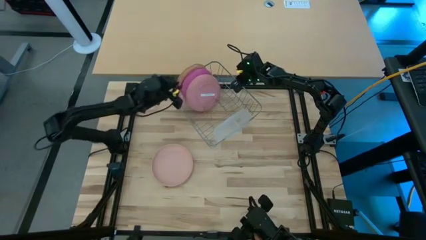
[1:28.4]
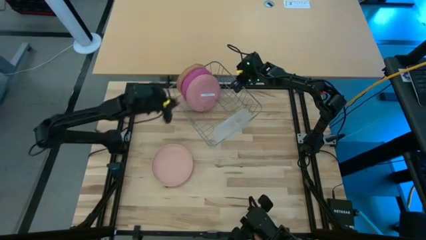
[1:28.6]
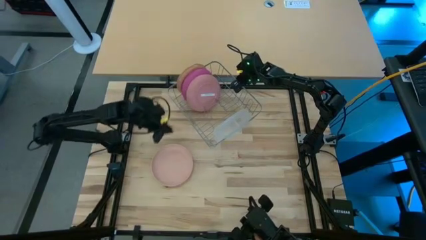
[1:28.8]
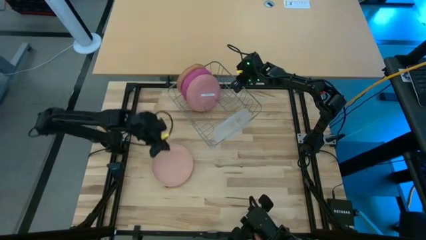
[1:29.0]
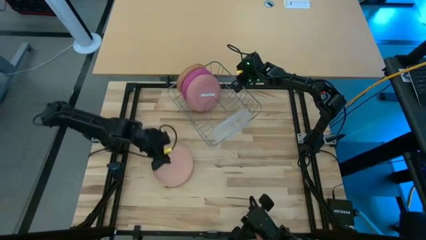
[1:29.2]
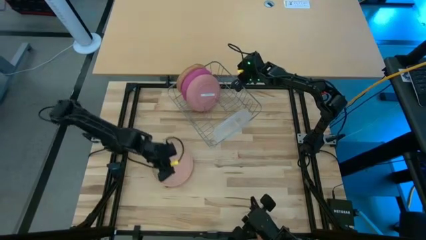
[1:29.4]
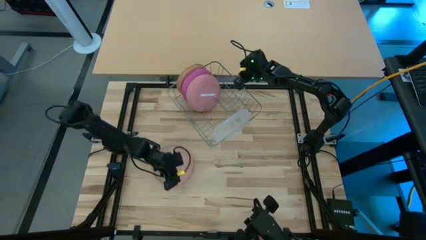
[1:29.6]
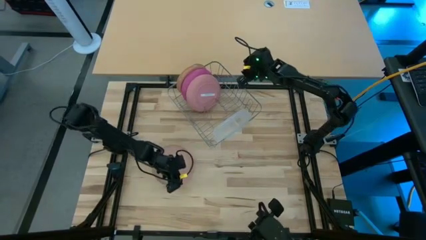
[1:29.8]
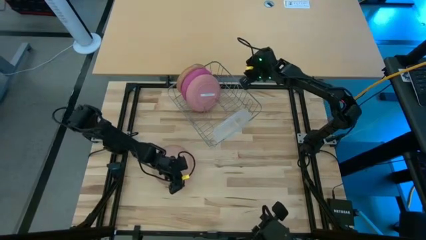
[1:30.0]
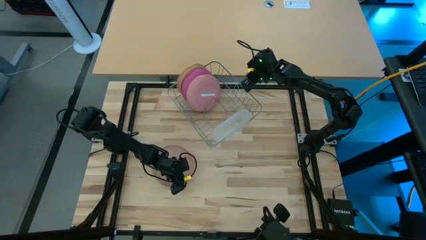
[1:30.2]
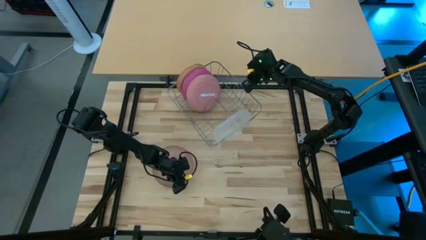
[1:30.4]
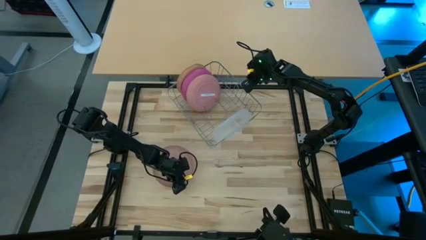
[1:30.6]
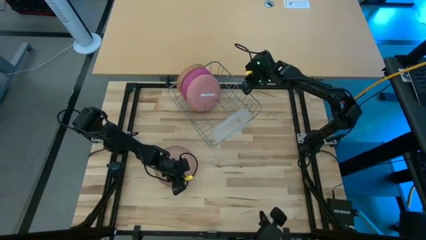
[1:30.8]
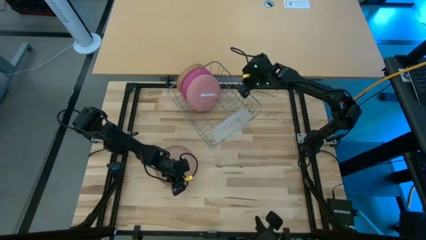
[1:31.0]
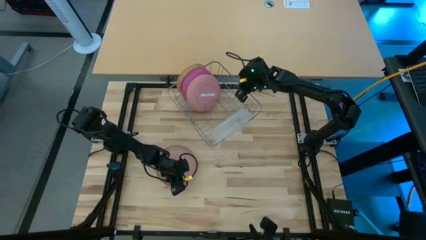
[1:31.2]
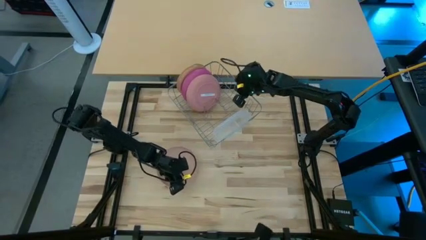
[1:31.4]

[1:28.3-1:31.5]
Task: Sort dishes
Put the pink plate into the dish rack

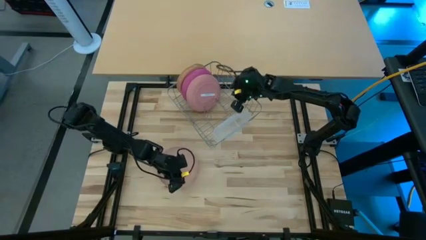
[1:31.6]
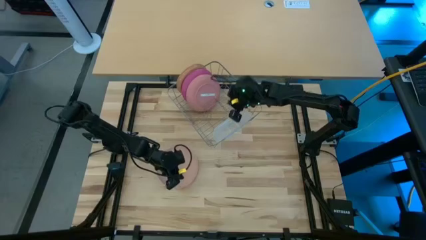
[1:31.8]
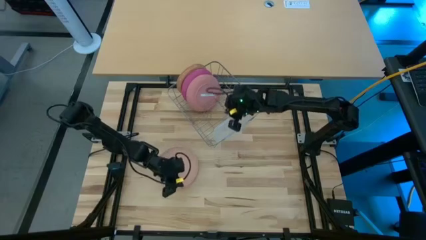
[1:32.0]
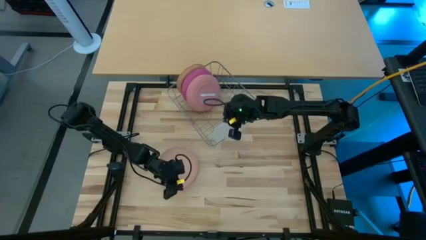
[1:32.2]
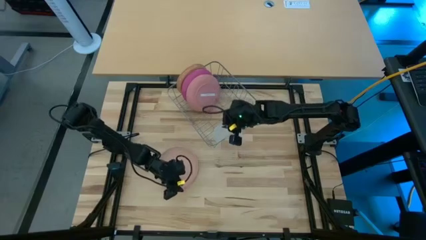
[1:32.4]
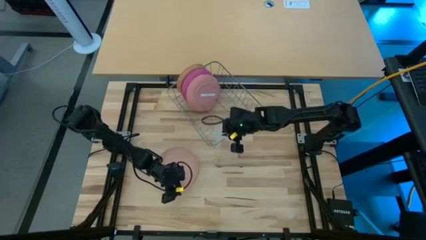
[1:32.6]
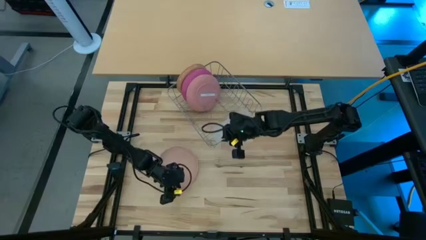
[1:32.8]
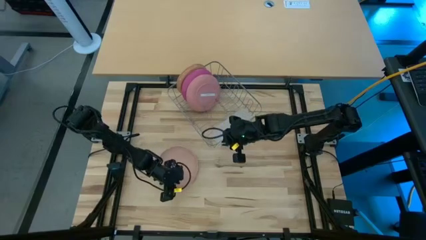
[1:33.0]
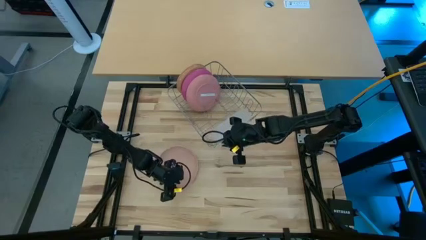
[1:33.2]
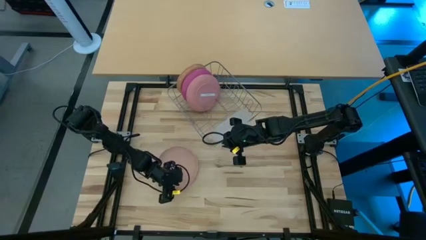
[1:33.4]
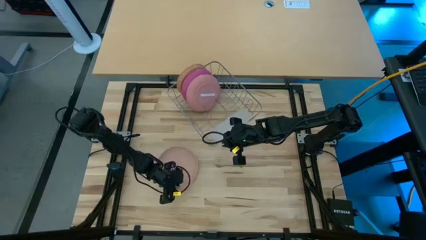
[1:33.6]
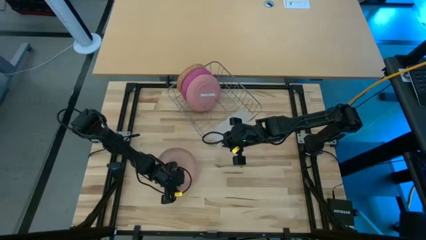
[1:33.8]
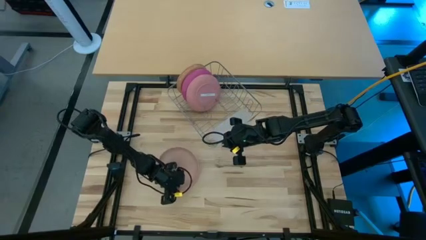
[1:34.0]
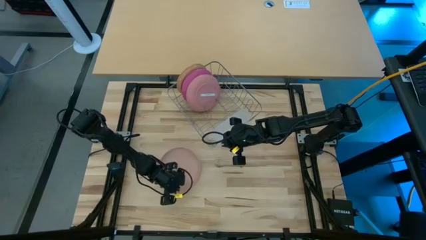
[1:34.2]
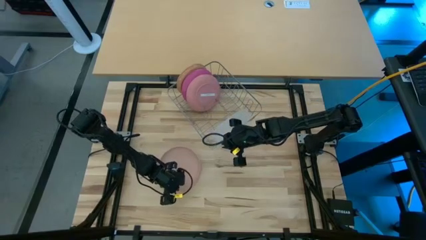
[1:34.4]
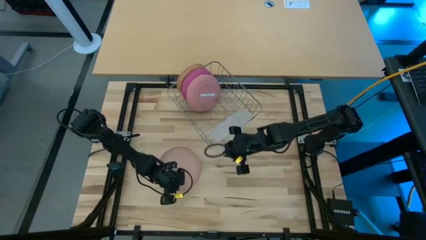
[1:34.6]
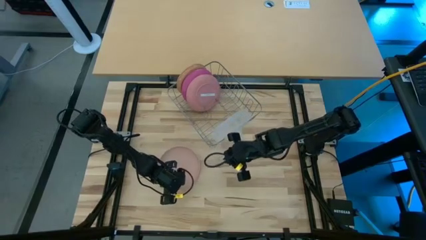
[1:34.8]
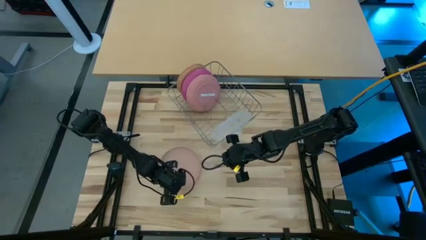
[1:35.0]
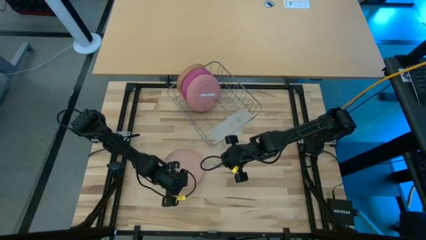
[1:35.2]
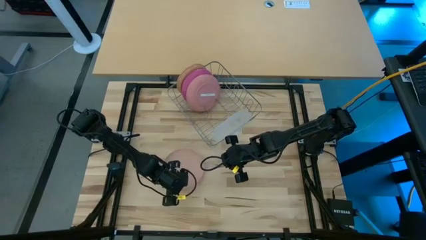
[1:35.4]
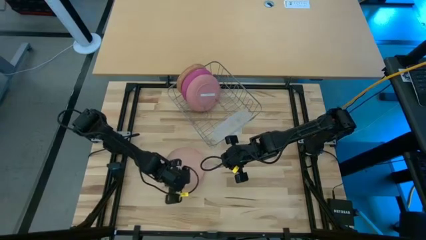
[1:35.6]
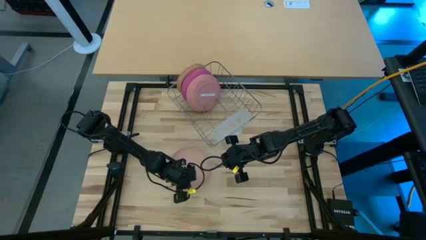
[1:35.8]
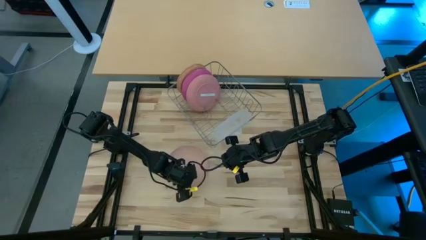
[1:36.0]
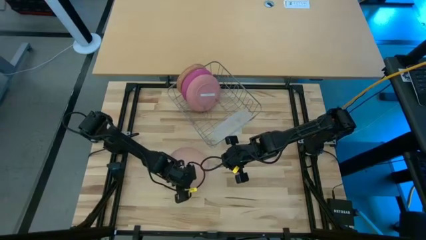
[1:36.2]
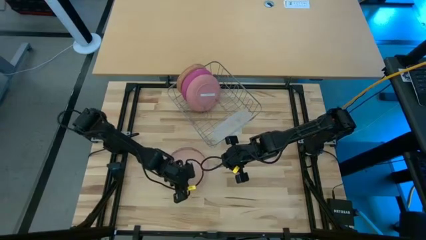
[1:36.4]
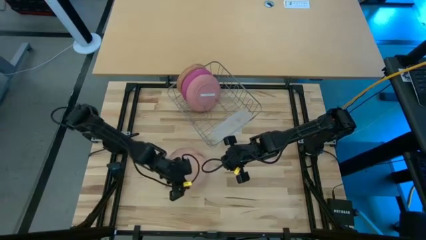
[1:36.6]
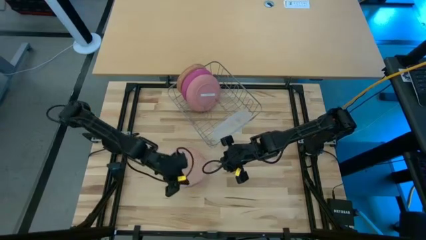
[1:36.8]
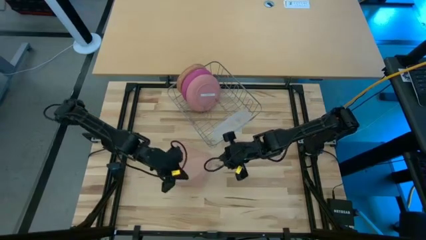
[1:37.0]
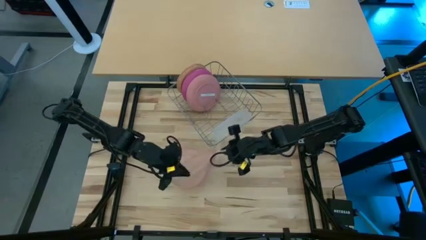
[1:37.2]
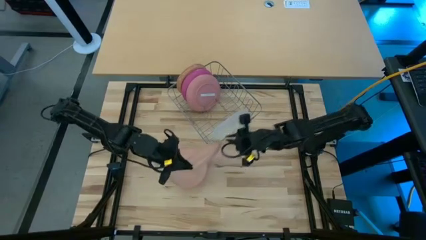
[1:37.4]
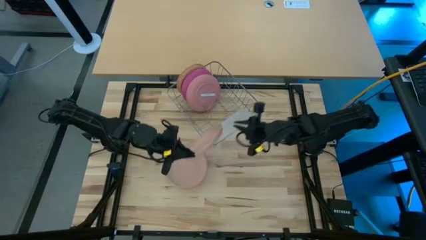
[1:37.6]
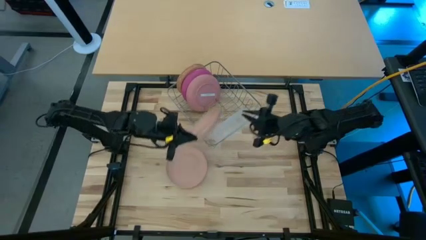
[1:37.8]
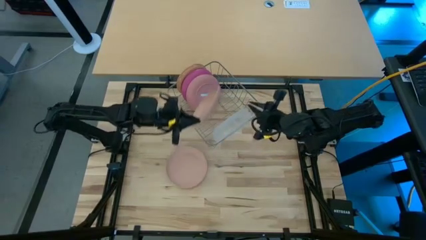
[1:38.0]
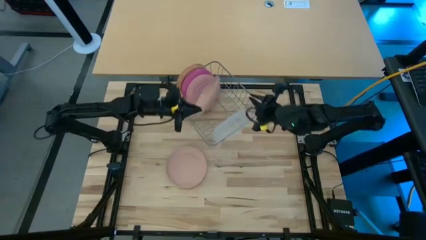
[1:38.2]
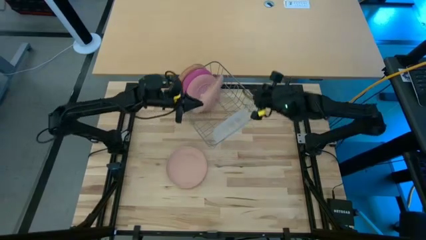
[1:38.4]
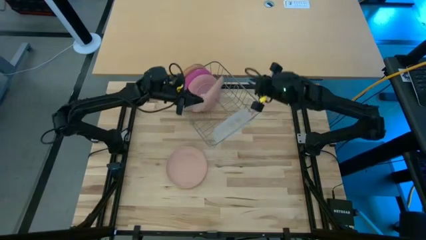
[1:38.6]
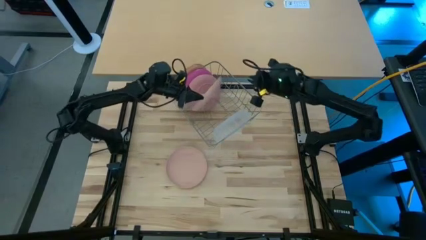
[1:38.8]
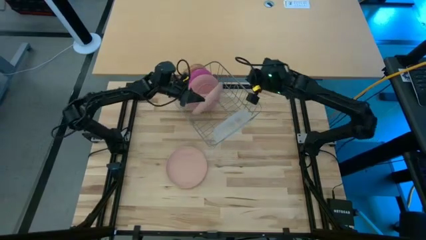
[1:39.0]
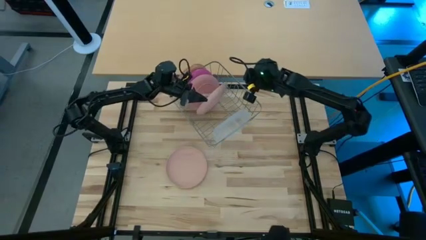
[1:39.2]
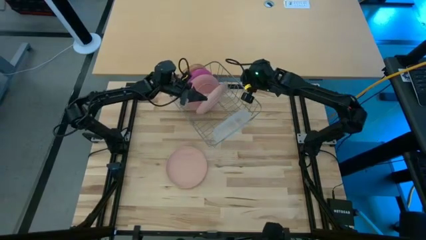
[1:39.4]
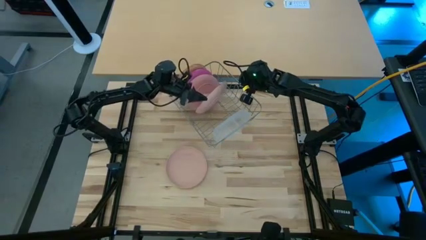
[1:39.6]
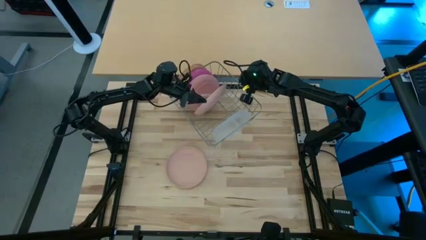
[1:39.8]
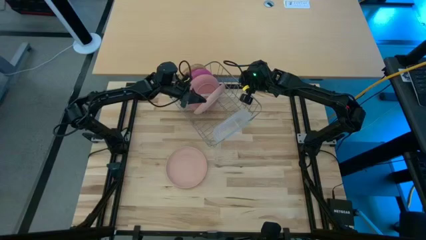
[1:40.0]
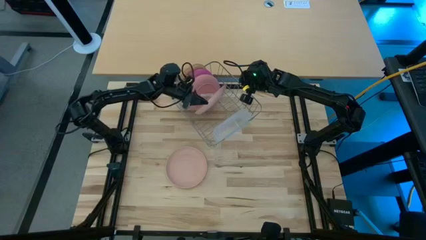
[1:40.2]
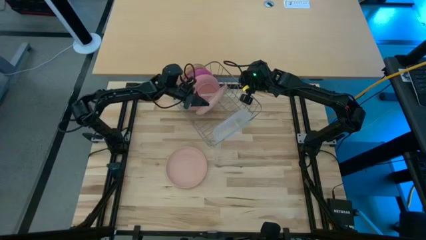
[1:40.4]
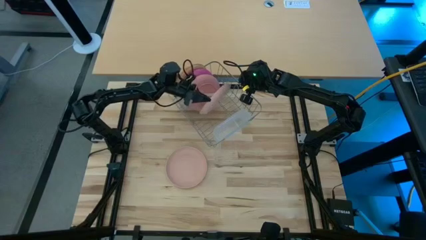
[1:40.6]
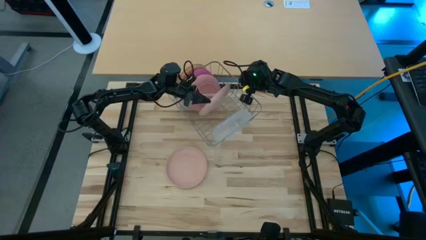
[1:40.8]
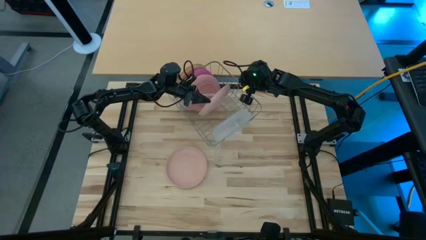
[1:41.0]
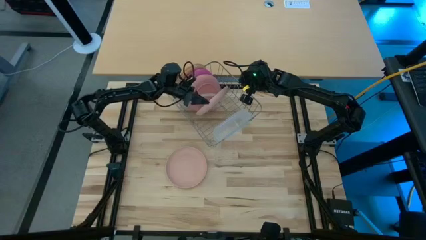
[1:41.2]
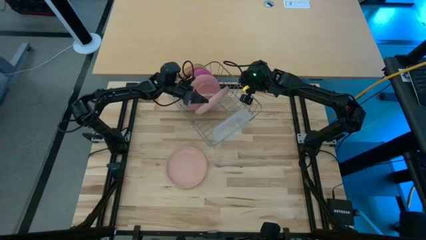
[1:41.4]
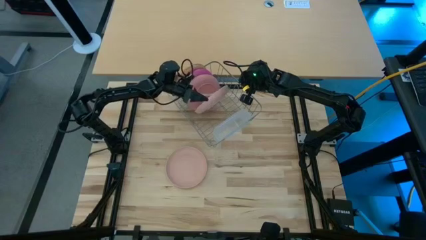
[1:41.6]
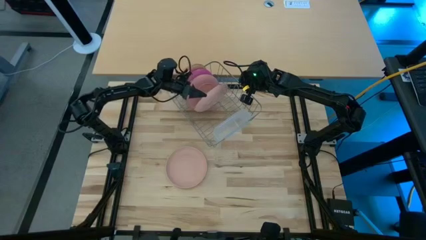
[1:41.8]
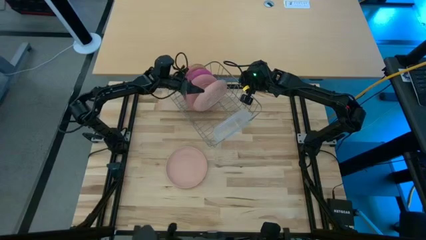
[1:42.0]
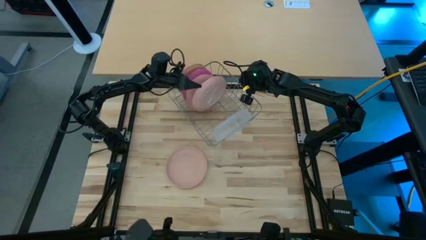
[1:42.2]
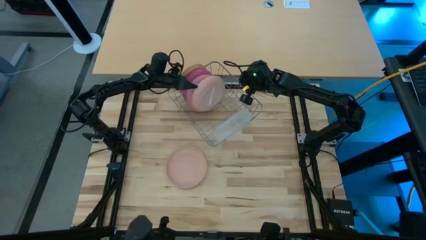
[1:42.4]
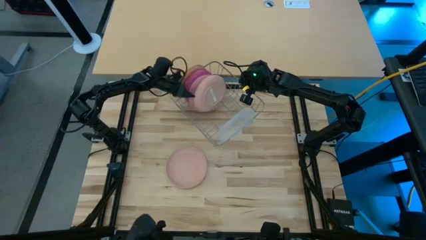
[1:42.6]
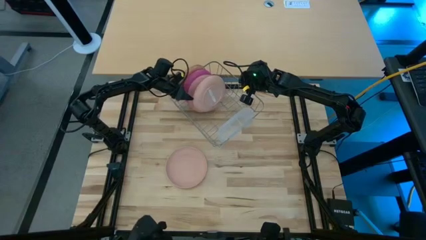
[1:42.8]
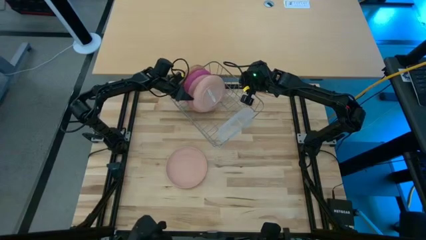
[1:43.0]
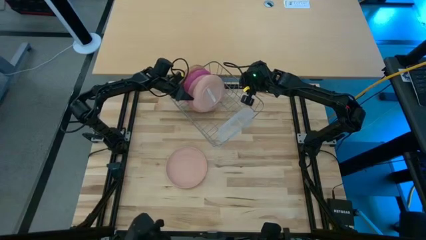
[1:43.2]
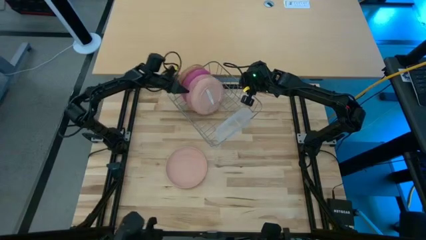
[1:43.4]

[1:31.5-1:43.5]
Put the pink plate into the dish rack
